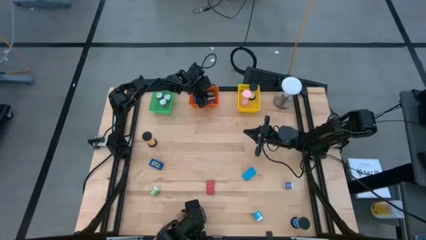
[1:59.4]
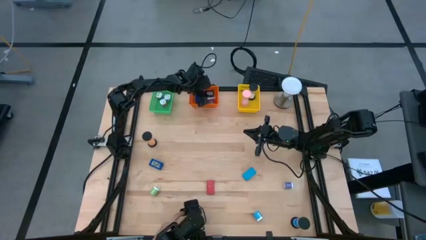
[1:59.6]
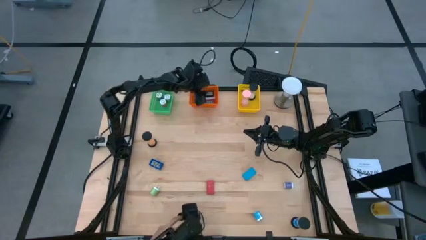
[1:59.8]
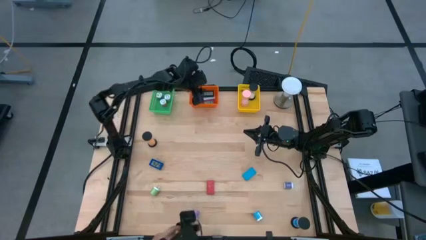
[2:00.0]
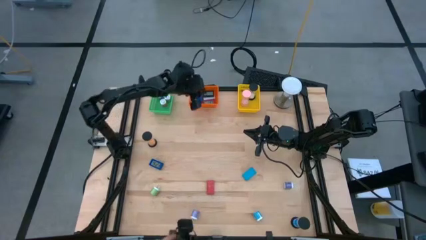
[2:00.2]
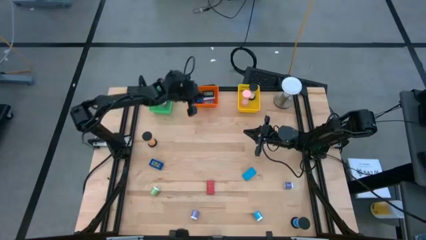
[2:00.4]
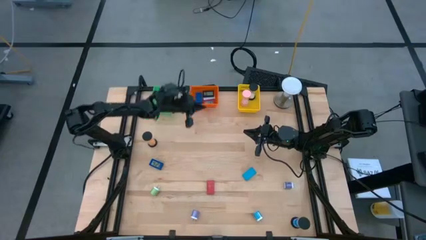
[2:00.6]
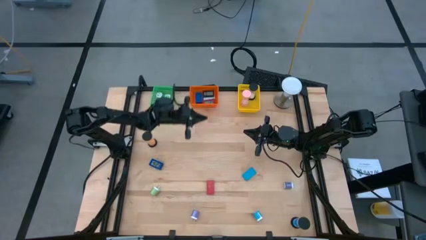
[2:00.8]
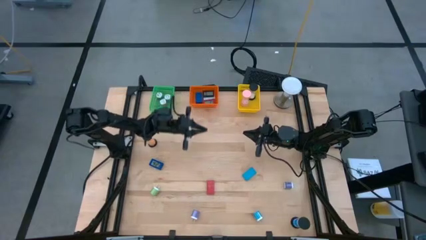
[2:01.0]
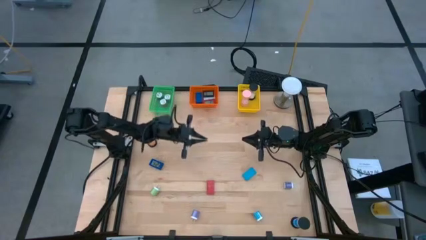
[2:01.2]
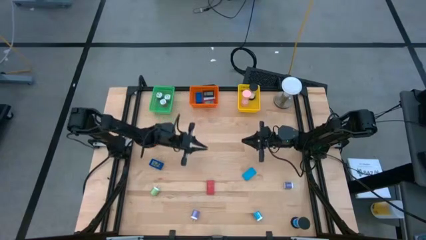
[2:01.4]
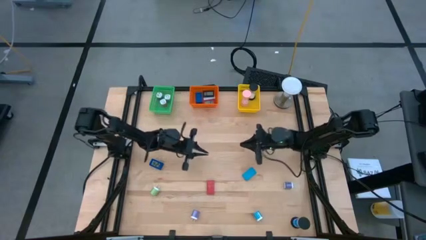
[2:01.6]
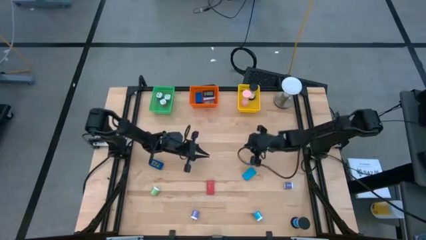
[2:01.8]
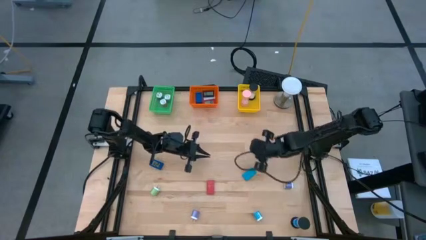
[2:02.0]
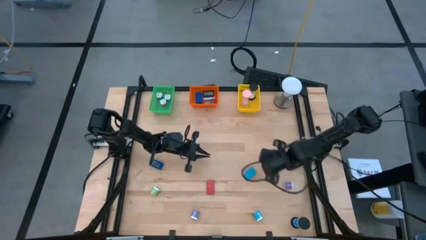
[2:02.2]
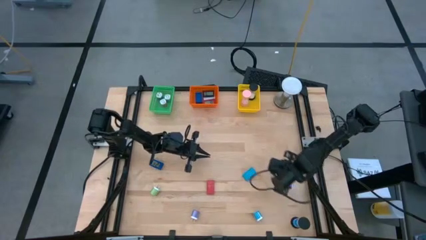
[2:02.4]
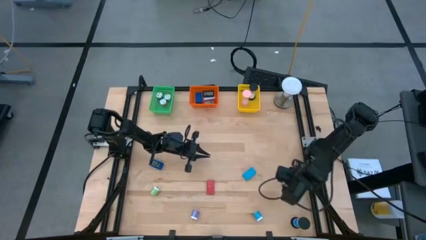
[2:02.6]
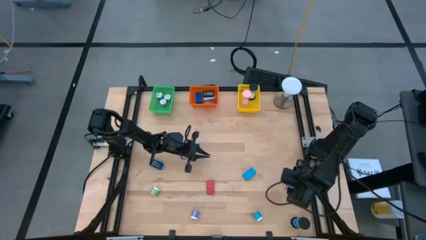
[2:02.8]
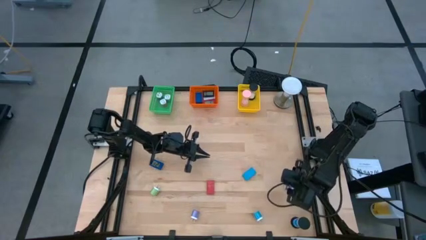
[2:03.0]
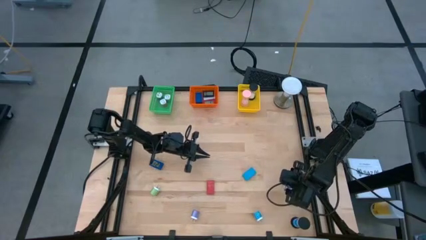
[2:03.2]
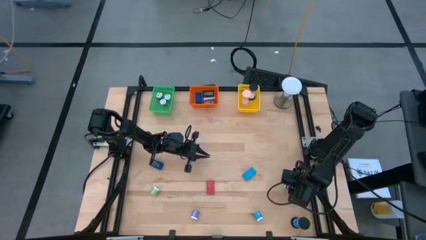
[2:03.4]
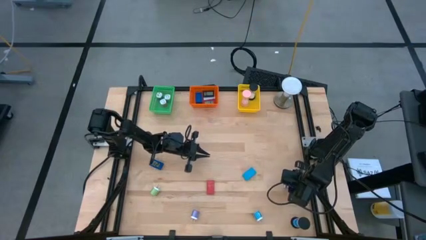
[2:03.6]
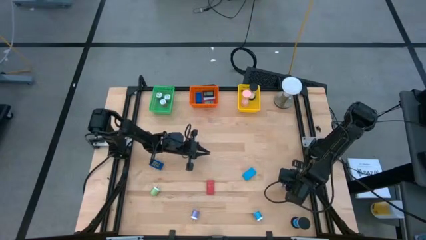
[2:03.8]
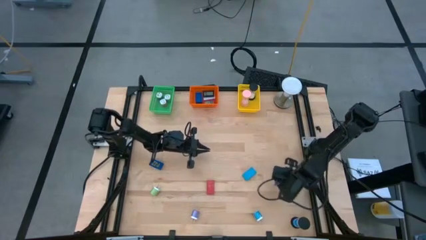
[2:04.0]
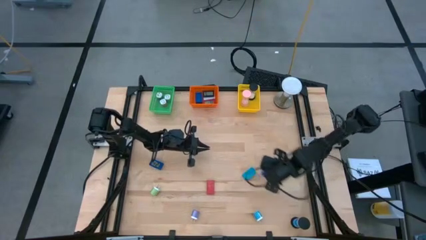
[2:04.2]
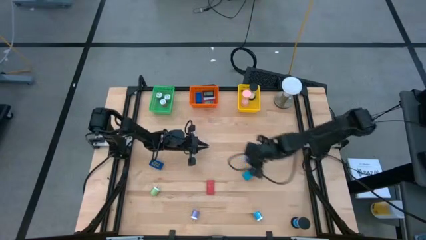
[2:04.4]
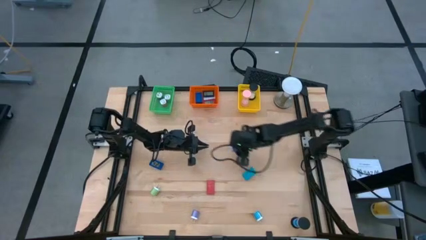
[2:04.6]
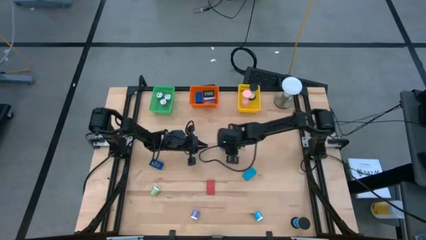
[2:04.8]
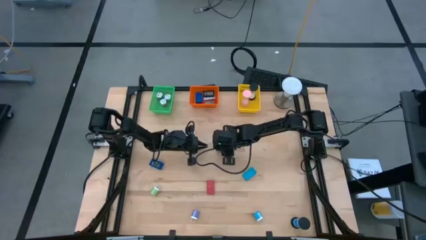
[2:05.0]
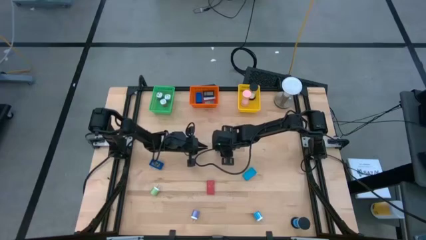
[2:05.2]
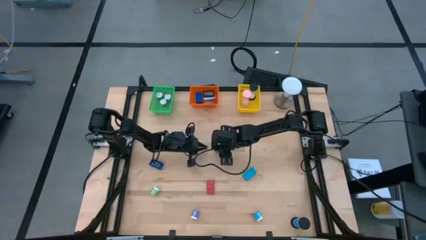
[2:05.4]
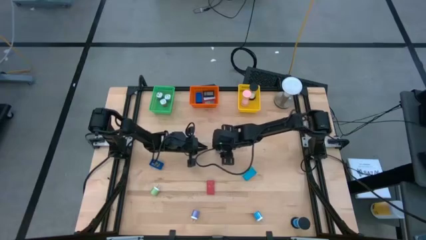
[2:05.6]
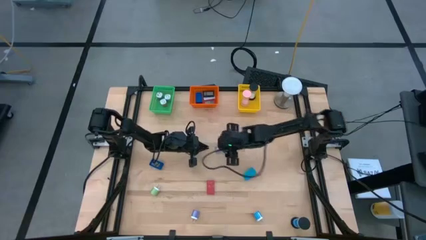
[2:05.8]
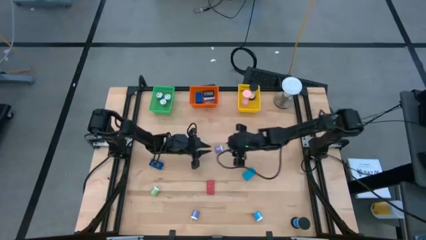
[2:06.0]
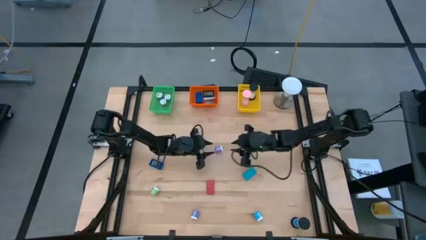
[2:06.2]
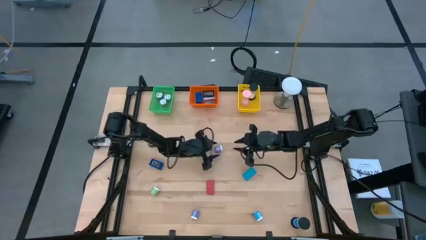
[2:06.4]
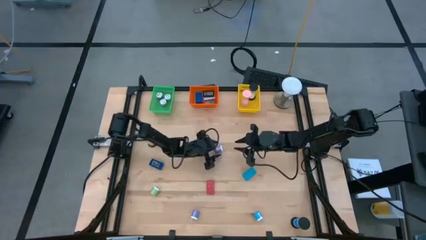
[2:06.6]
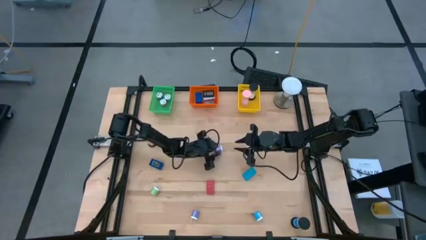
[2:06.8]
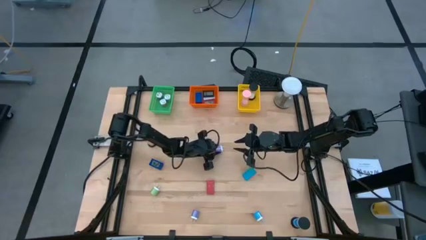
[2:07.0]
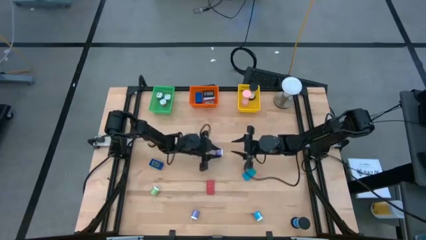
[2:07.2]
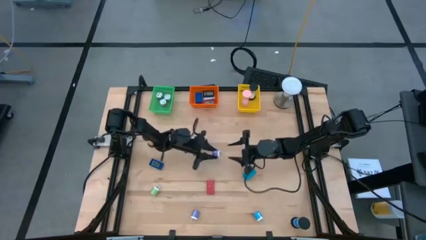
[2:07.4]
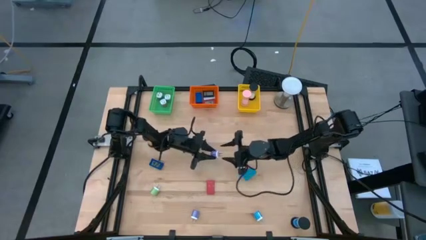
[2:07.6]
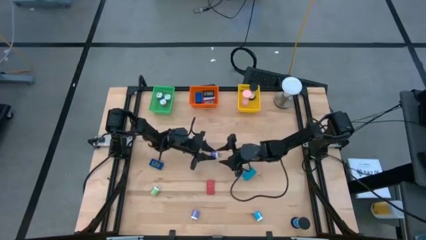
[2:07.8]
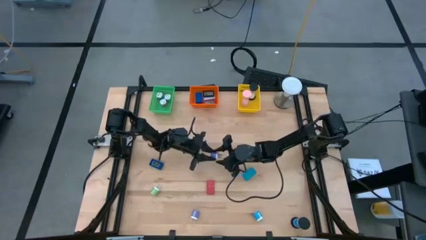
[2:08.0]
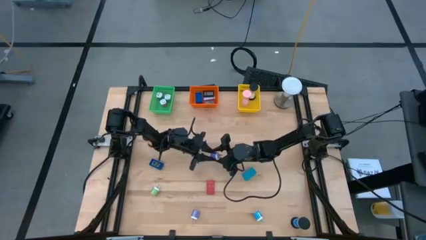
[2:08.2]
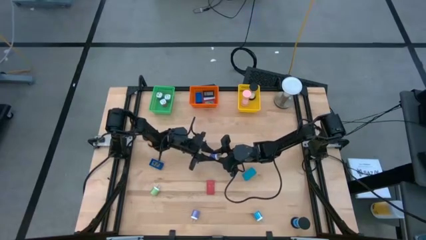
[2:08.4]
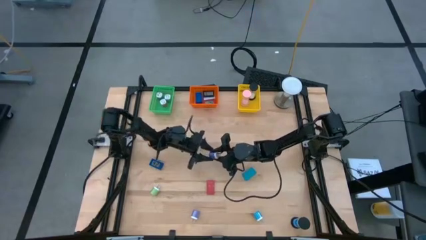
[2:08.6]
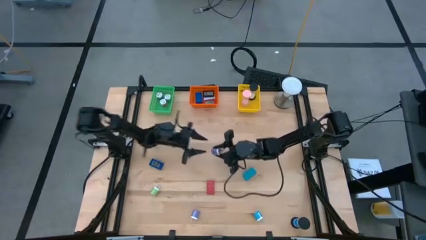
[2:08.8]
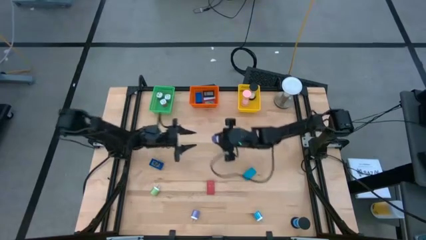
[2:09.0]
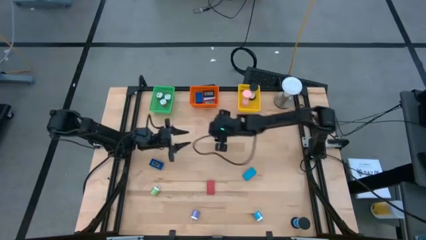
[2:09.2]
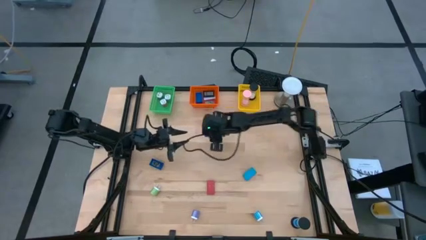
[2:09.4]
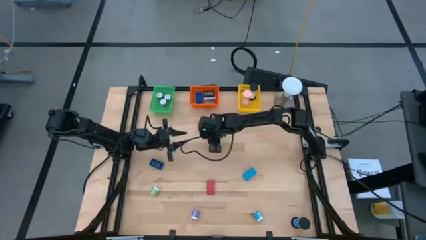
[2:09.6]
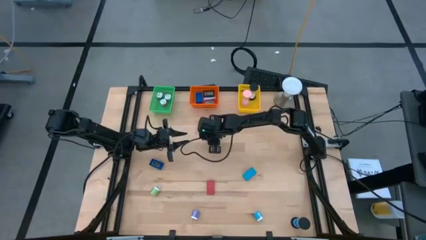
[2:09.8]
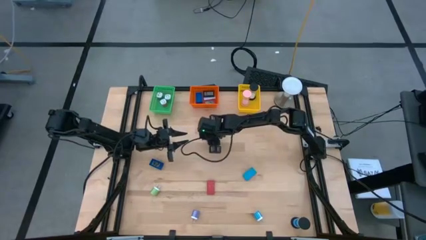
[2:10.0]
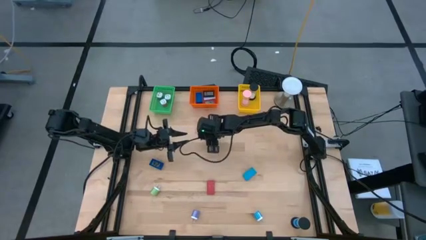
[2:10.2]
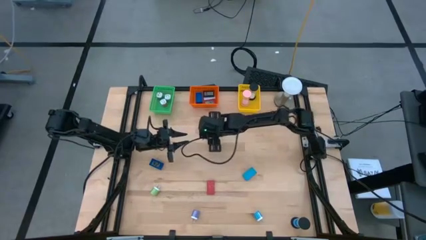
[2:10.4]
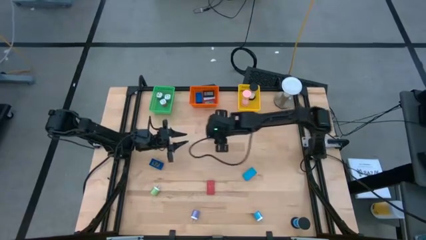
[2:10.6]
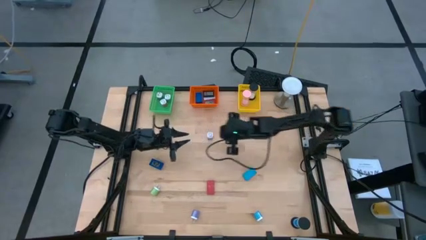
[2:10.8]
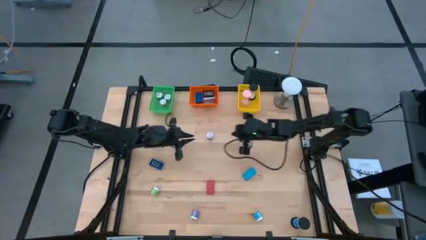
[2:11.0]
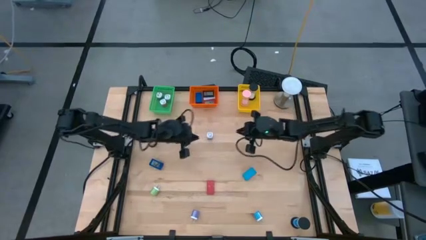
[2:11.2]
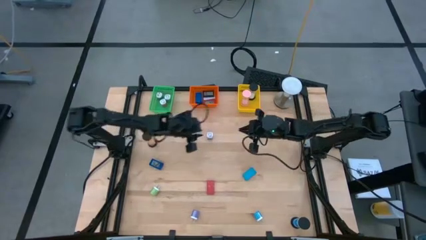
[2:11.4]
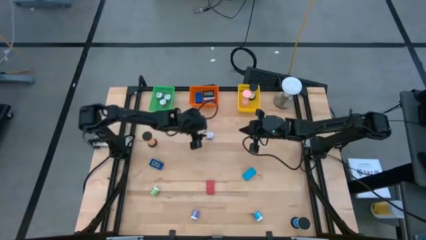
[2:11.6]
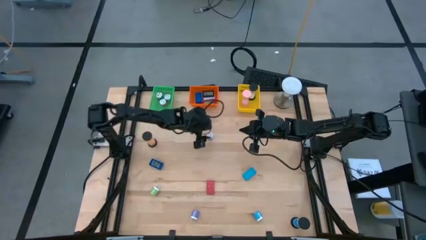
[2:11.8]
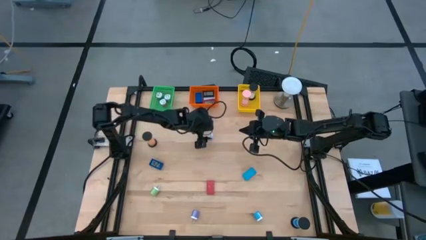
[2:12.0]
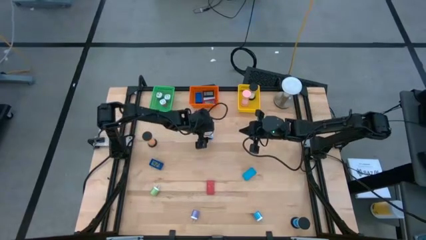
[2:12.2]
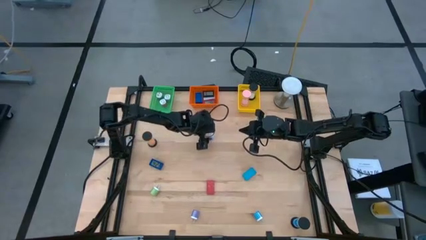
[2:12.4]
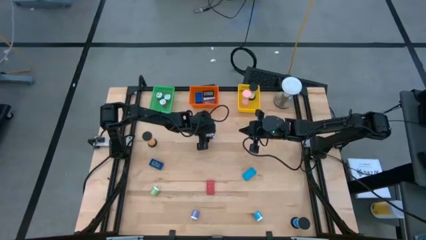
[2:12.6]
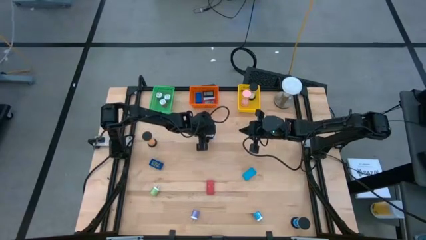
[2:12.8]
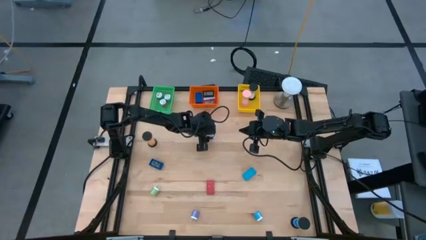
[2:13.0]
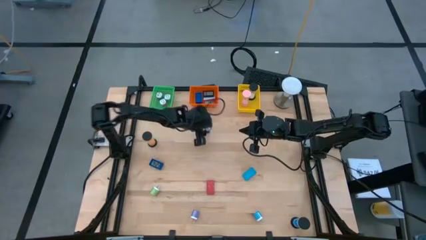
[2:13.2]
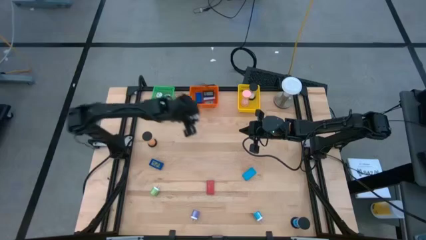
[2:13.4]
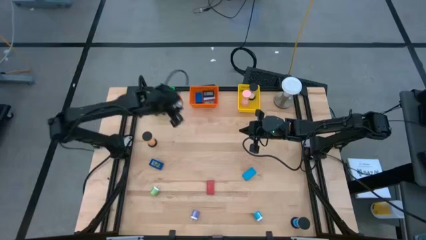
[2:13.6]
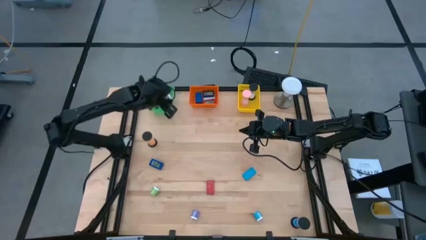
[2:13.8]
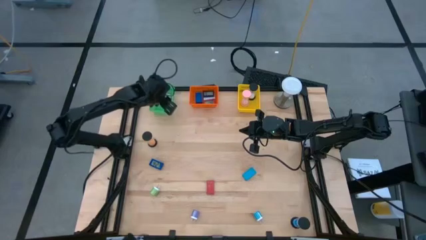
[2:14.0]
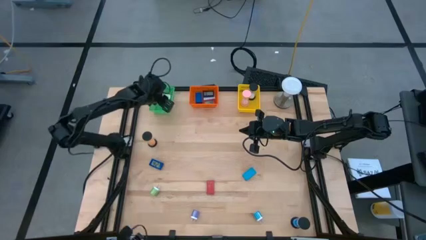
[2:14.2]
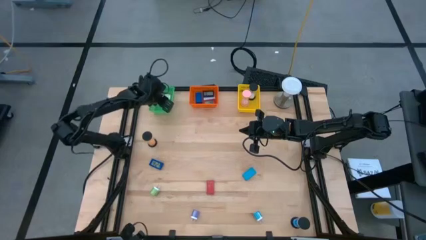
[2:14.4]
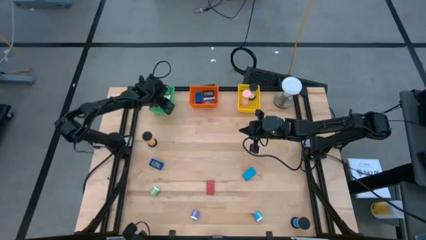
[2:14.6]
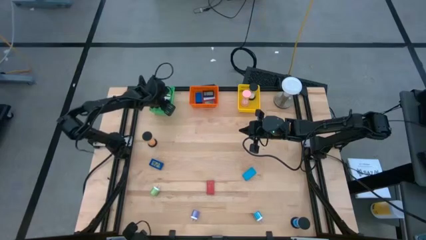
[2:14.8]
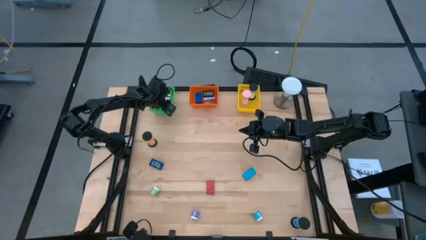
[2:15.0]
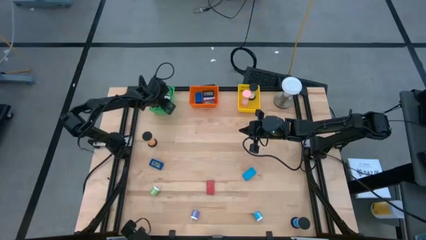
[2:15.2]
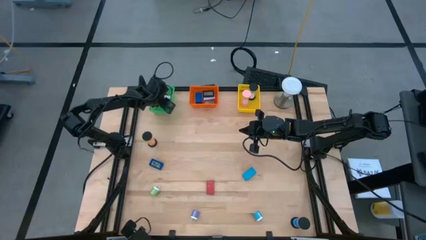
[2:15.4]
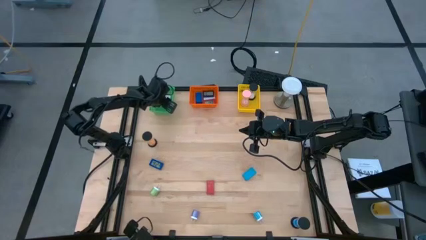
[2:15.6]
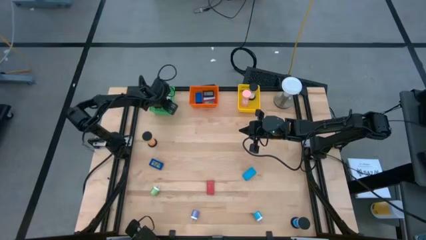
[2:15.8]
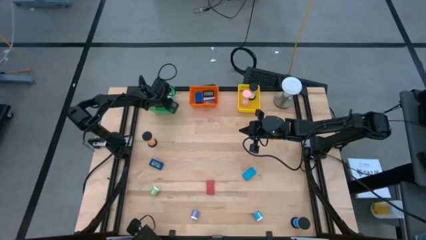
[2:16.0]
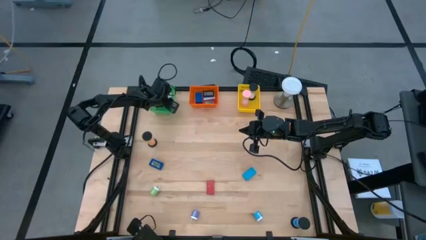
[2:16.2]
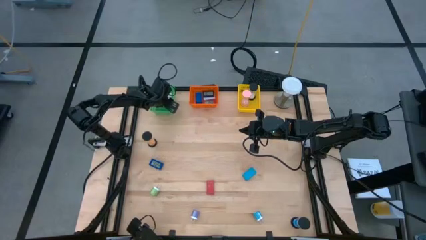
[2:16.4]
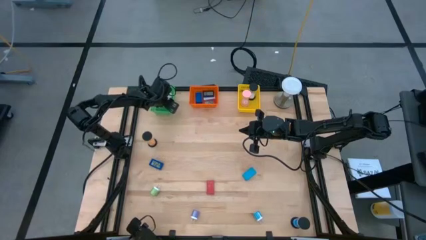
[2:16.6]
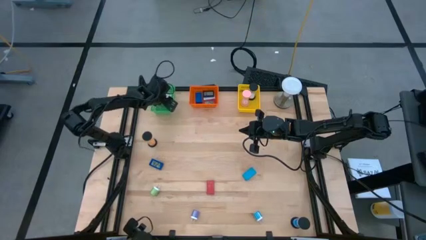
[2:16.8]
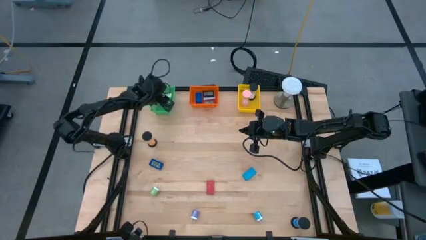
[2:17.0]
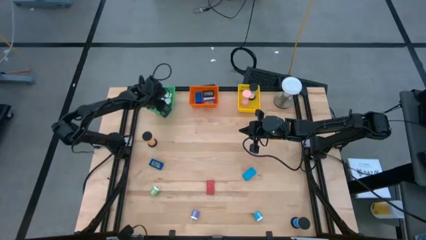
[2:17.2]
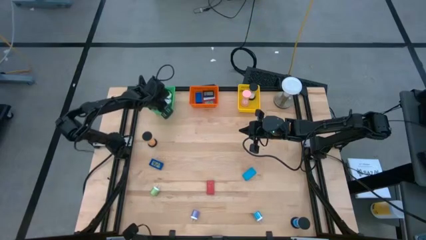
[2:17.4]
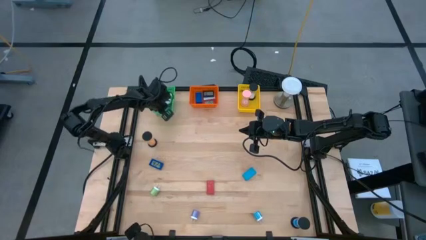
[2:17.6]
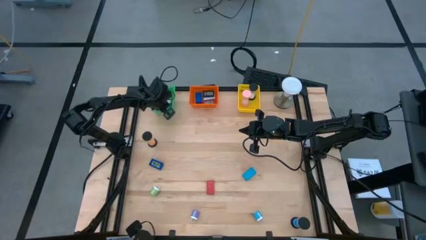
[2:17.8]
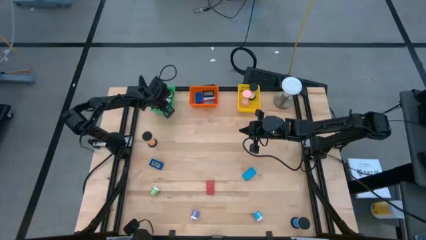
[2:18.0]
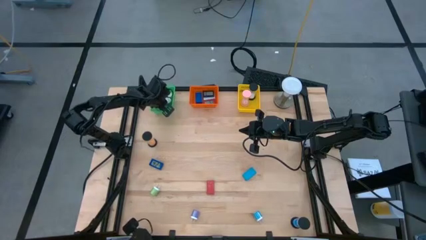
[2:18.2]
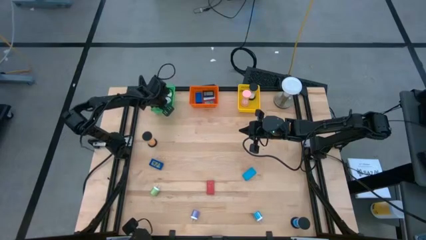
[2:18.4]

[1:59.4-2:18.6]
Task: Pick & Place Office items
Put the right purple charger adaptor into the green bin
